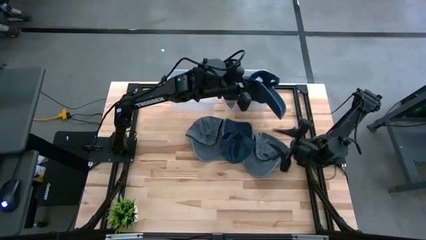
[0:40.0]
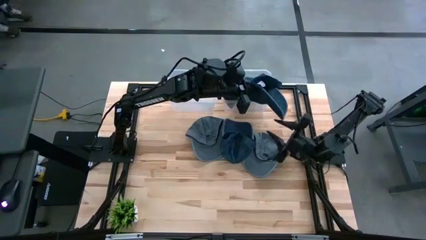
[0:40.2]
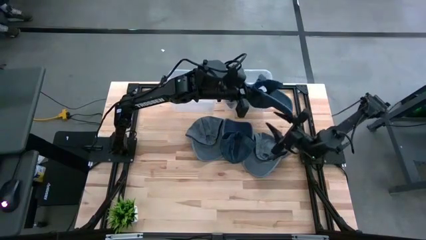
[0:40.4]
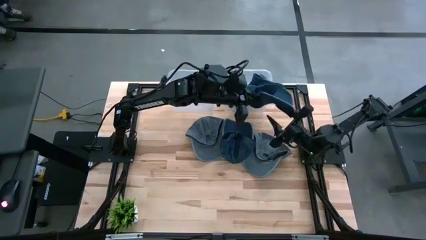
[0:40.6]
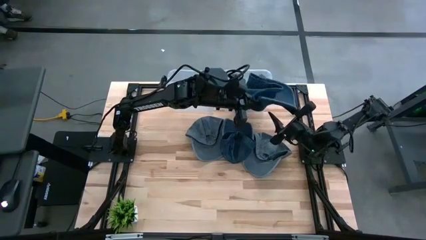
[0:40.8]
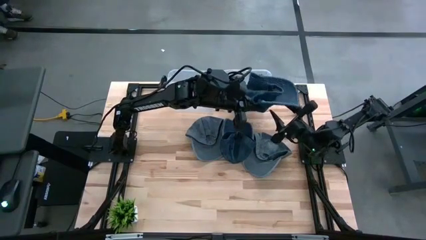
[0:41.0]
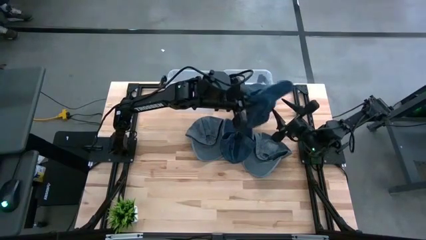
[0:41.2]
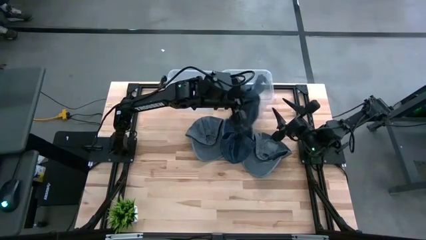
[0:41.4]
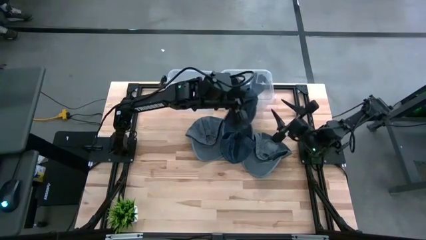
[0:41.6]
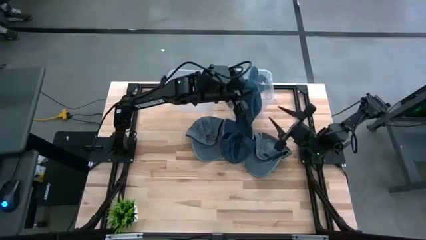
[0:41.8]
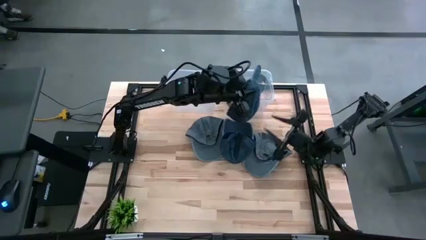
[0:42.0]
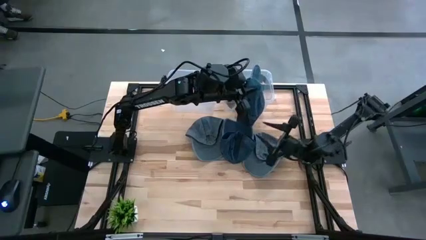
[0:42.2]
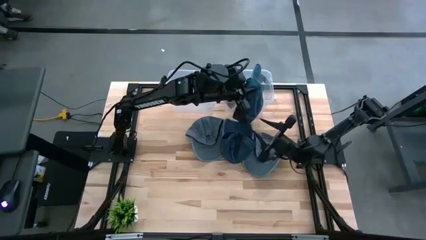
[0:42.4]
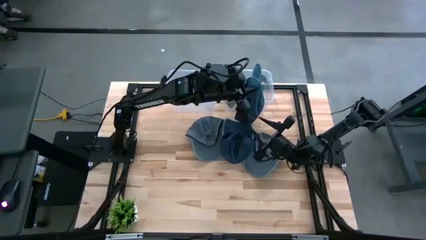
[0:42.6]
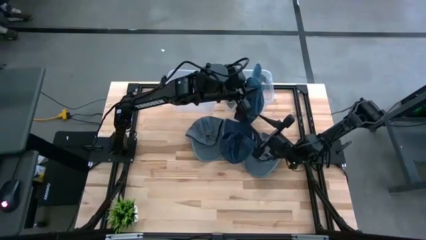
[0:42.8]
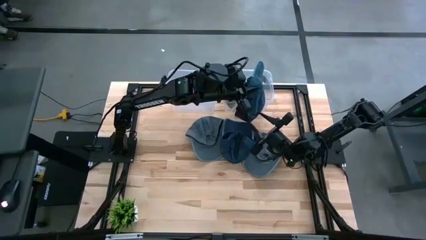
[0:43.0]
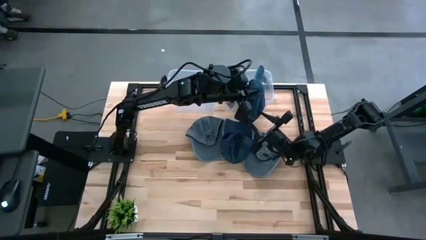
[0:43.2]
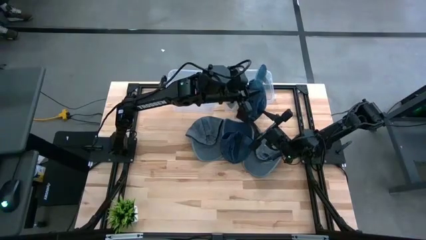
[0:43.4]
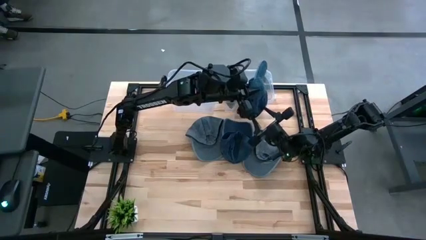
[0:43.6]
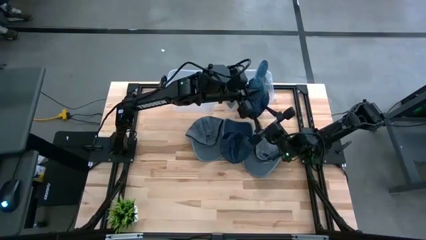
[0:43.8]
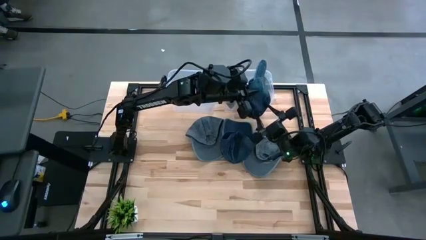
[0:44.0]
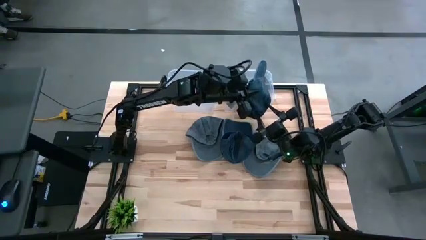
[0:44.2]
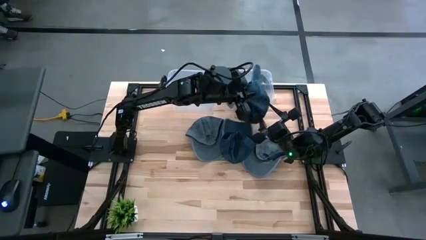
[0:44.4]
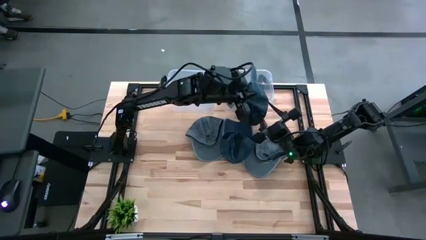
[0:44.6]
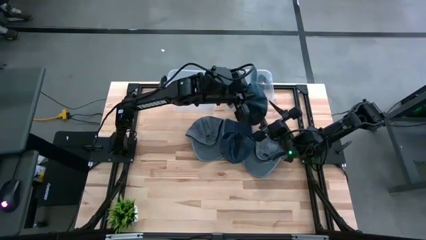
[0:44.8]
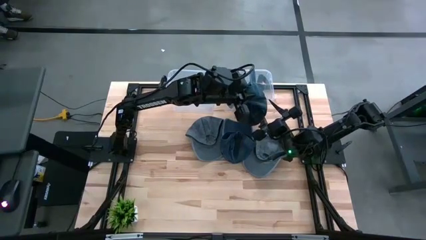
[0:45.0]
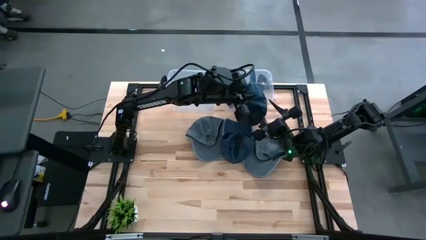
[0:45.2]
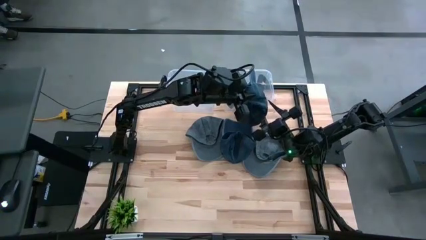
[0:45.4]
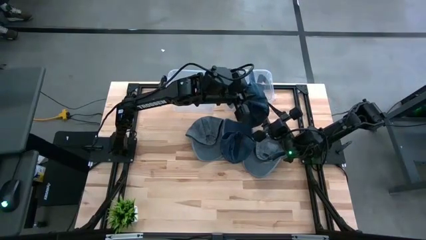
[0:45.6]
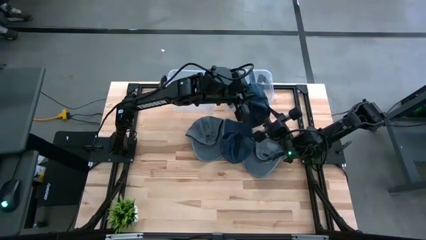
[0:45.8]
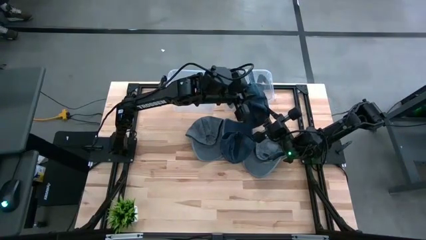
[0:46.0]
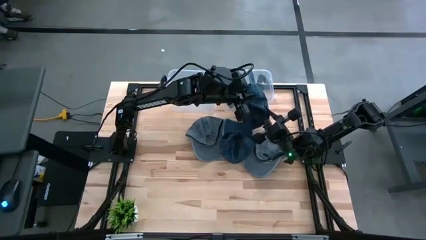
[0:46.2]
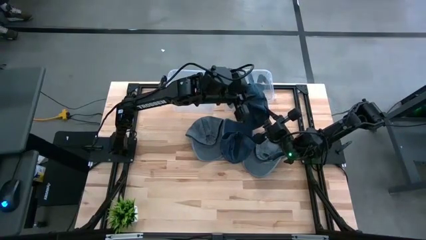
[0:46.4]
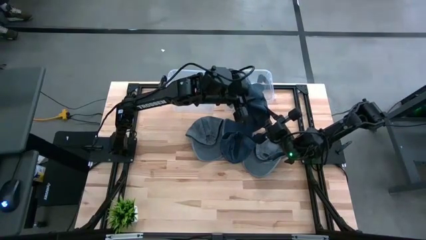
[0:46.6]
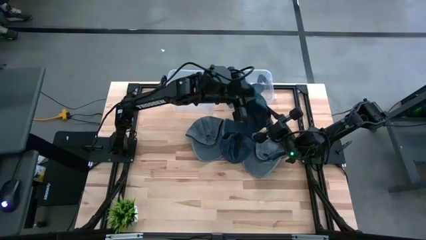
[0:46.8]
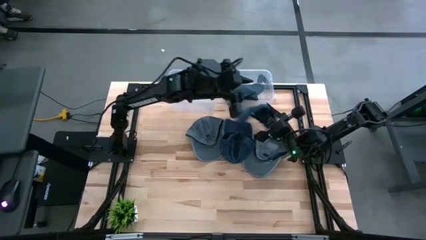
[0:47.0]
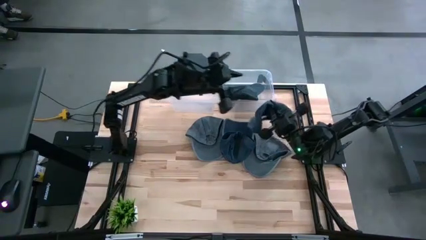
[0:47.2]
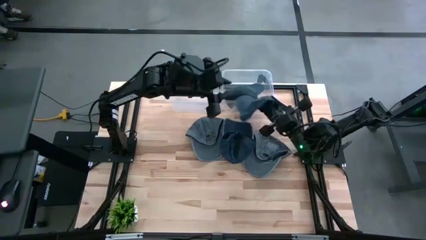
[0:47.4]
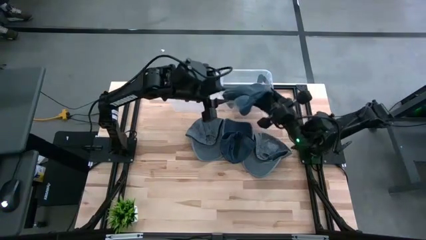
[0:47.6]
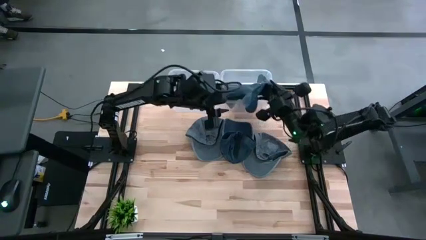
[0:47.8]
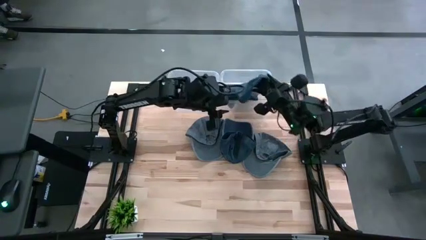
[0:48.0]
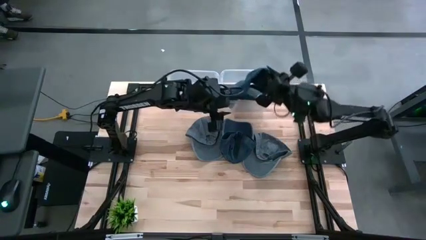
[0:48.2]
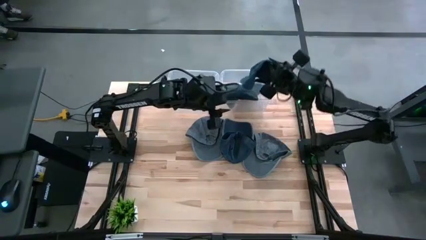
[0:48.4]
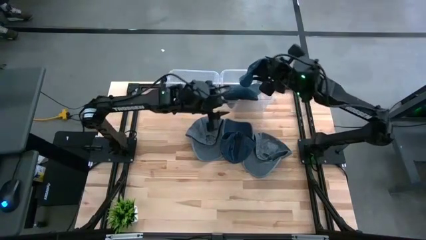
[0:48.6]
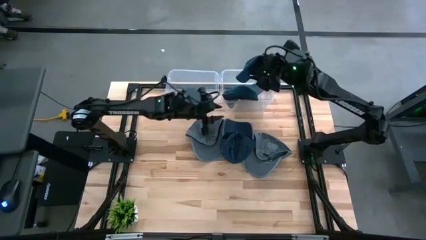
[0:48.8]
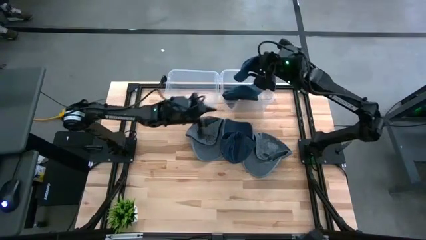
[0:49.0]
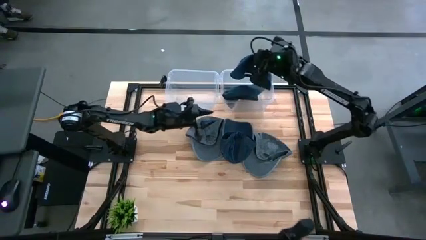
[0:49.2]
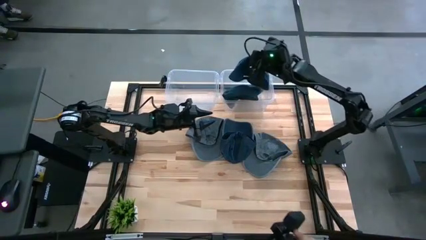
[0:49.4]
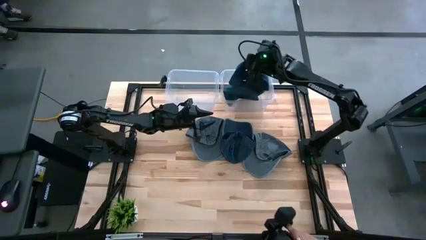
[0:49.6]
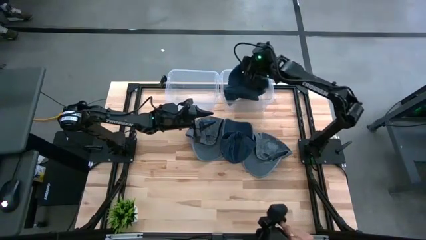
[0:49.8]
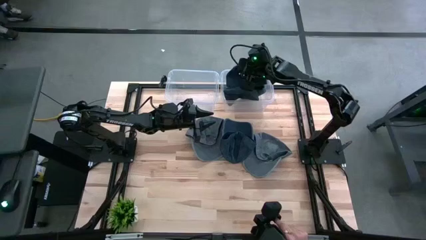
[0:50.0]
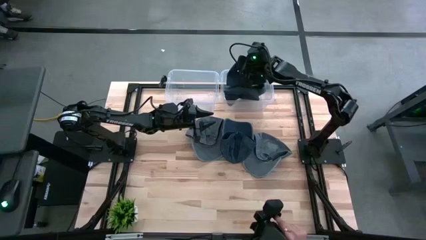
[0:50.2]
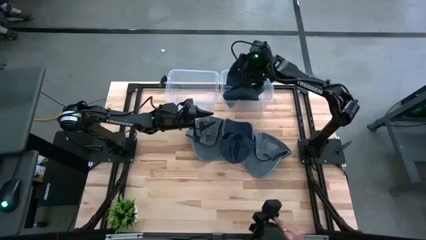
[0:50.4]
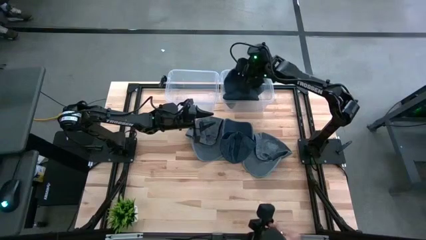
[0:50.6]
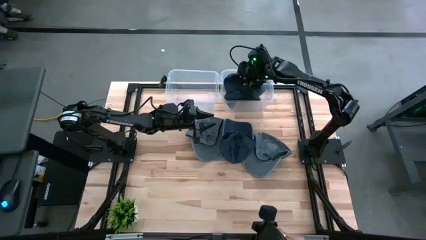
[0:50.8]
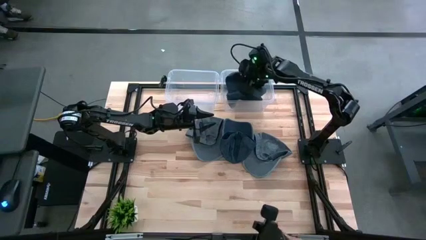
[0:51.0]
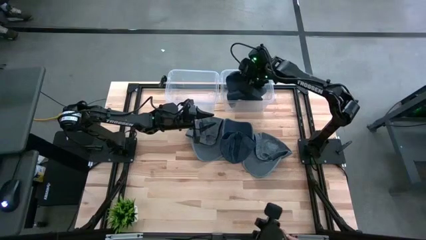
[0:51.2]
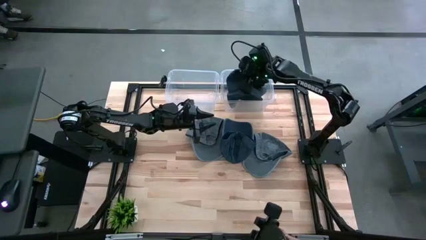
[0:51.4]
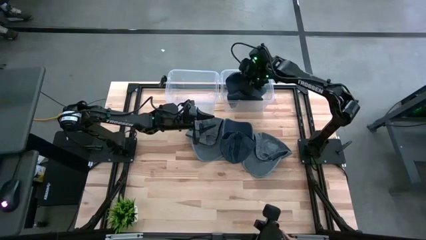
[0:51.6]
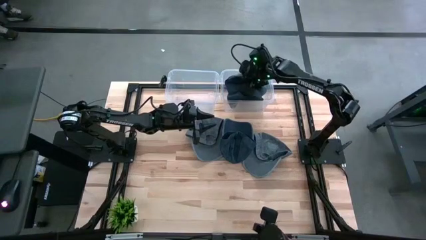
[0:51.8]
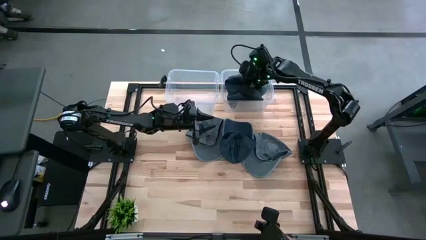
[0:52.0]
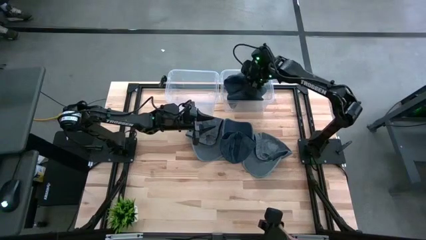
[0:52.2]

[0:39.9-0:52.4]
Task: Pick & Place hat
Put the left blue cap into the right transparent bin

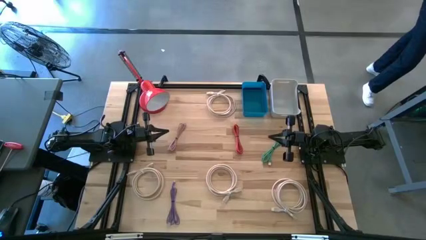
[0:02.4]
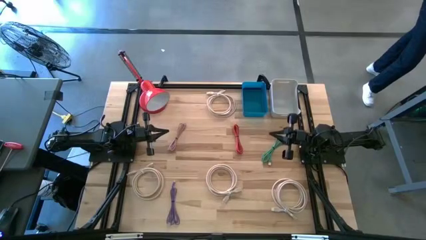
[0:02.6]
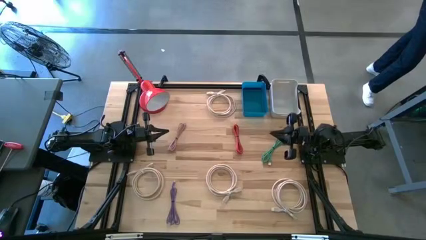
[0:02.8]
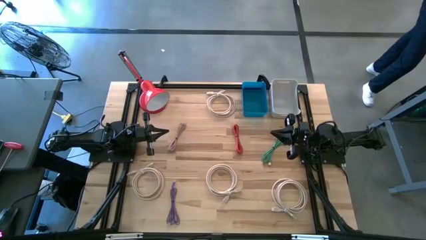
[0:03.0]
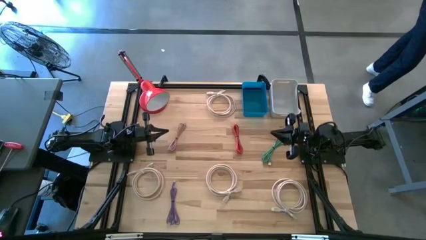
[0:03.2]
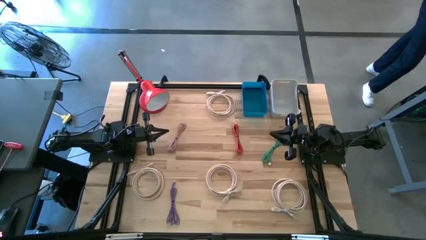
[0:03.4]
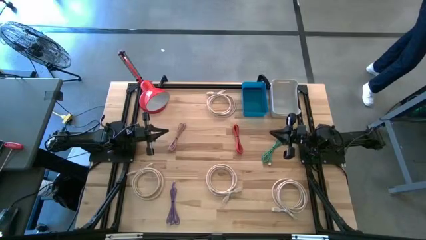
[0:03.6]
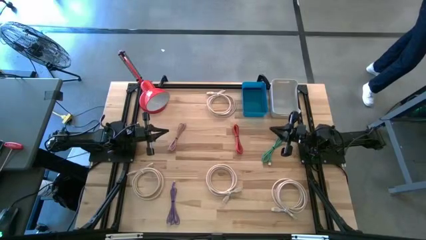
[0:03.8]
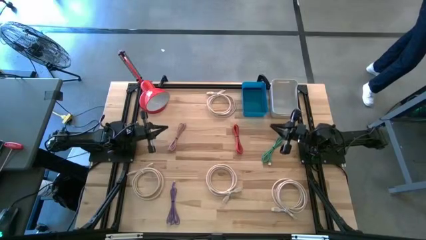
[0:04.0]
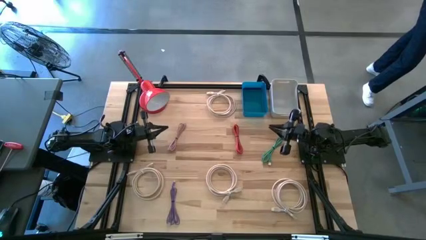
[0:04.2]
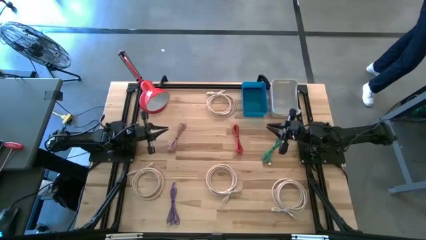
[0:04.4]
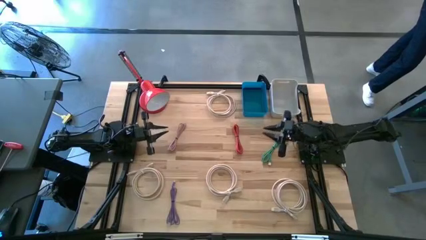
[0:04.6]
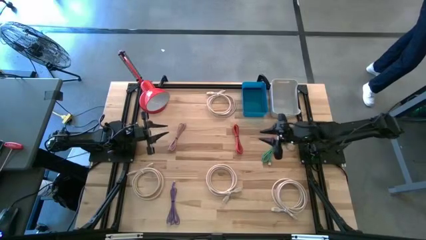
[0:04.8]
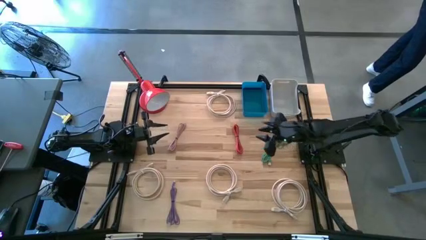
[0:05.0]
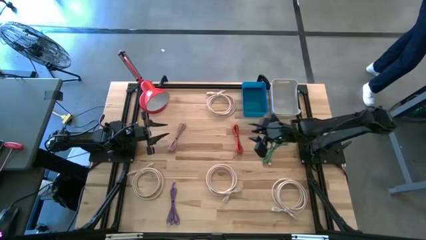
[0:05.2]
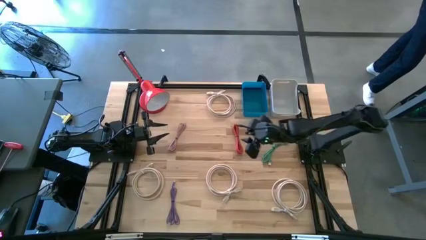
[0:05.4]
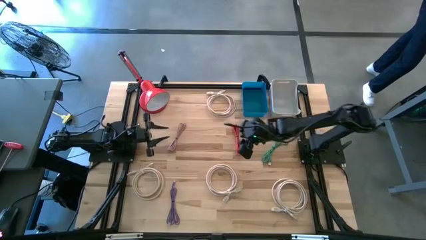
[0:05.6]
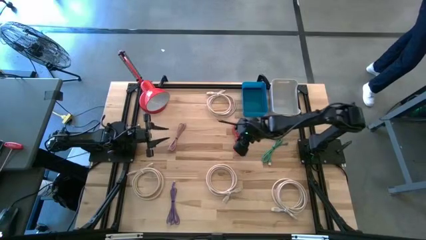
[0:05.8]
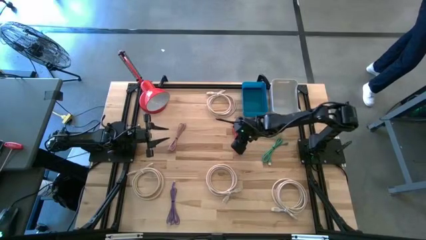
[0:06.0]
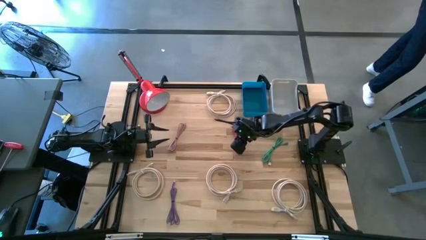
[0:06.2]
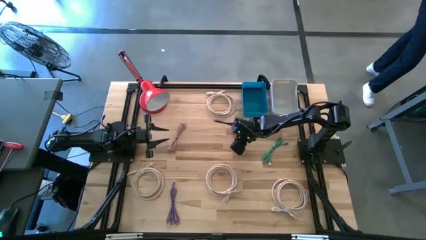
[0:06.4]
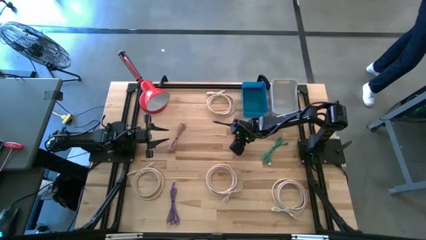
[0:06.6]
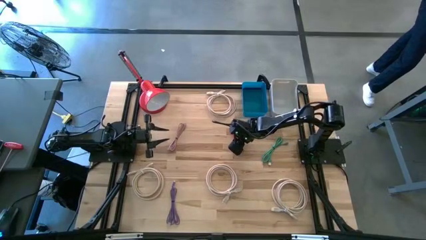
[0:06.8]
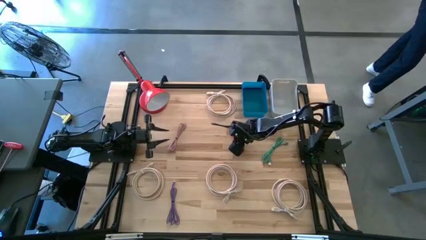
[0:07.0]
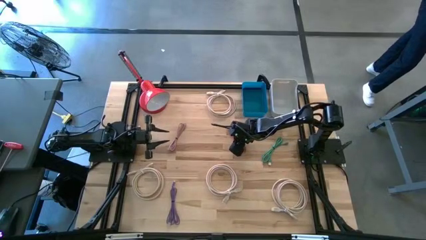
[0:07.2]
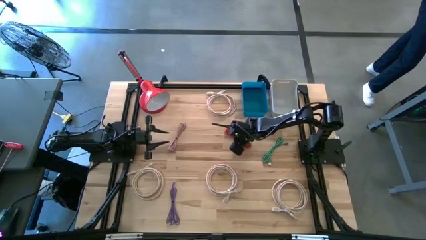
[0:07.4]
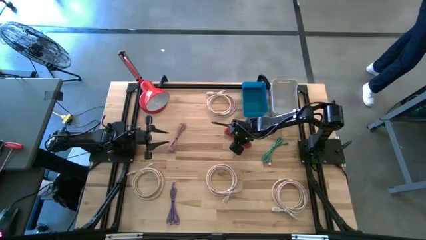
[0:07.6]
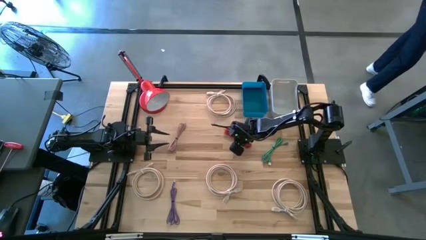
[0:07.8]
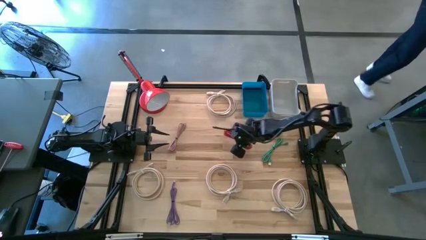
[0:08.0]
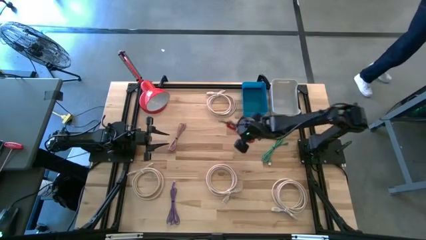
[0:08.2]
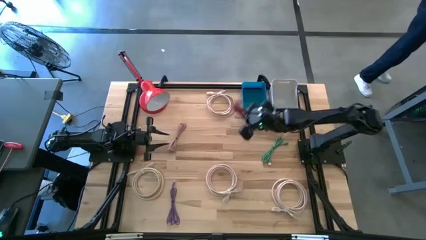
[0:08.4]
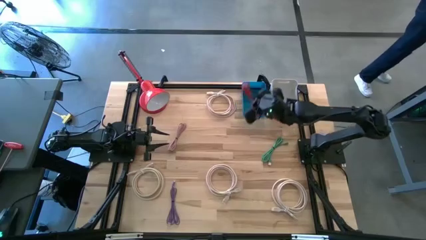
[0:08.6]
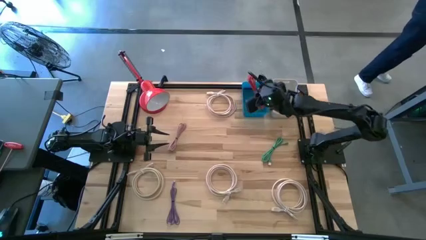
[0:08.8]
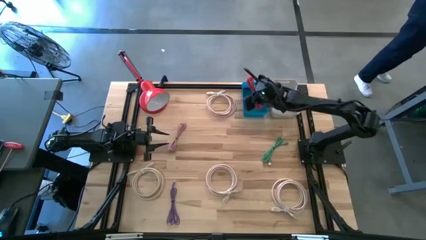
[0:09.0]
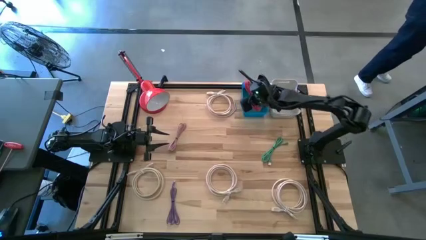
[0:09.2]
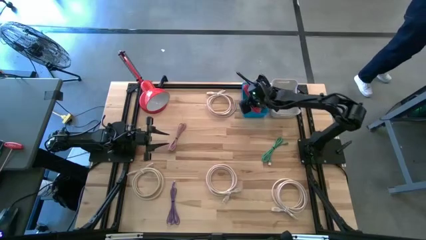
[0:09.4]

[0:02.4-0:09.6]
Task: Pick & Place USB Port
Put the red charger cable into the blue bin
